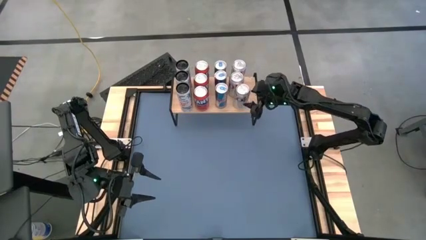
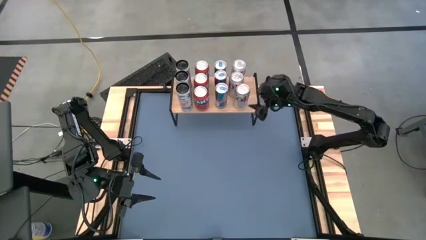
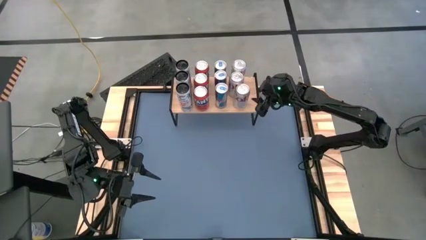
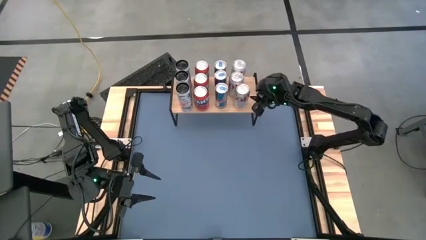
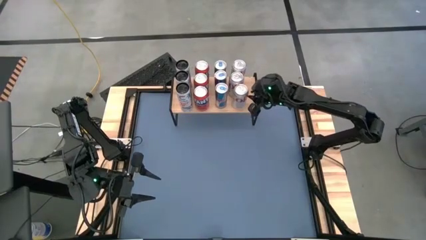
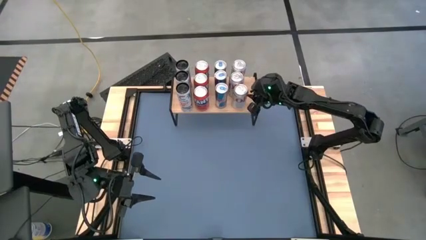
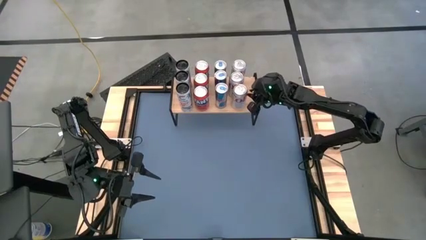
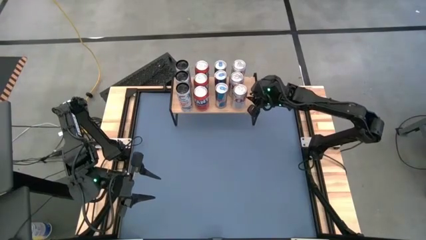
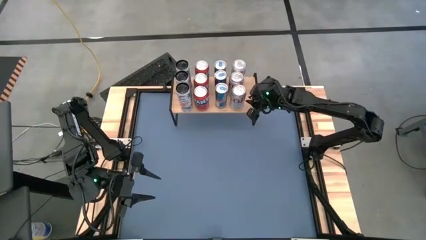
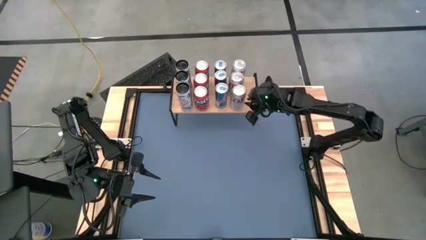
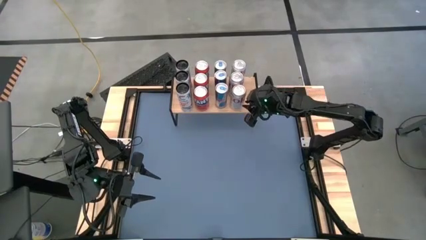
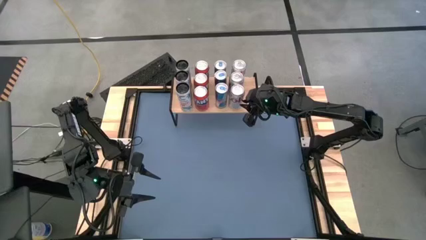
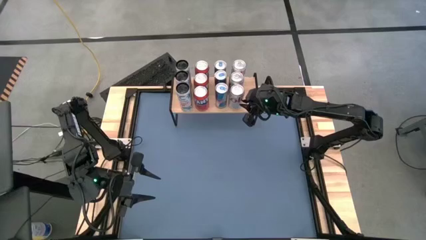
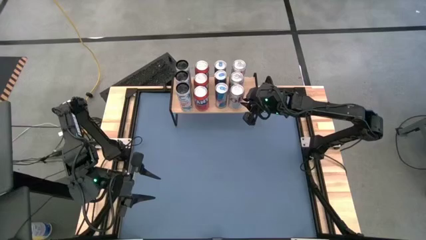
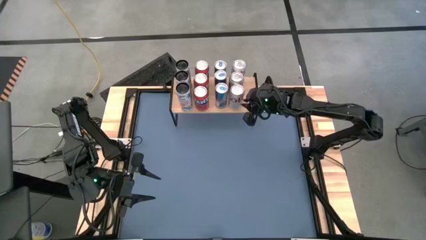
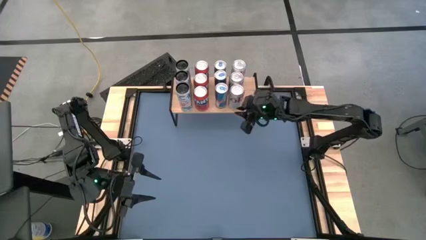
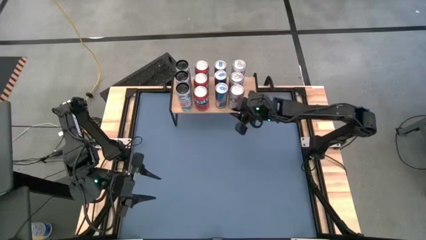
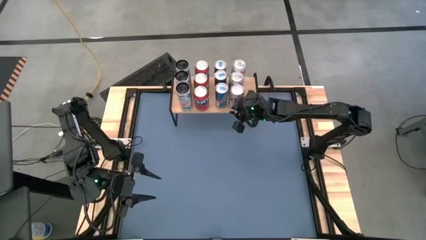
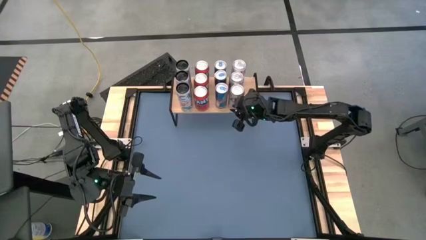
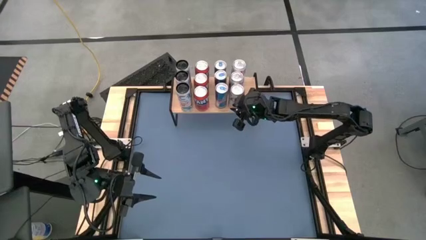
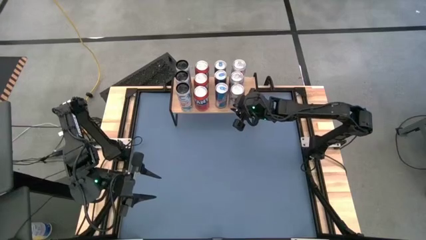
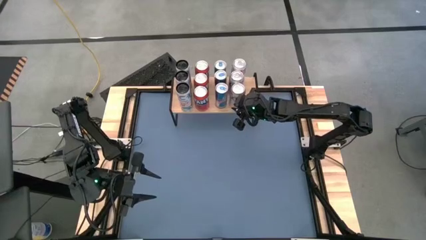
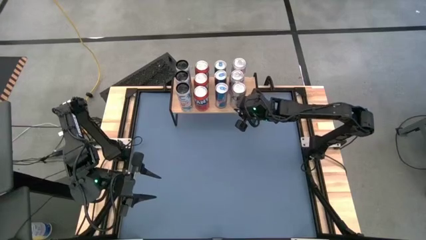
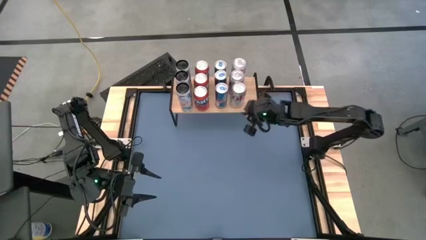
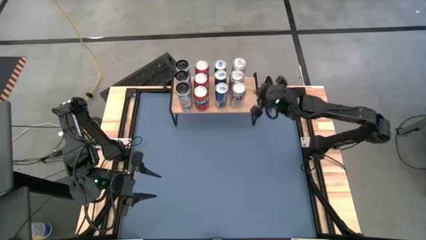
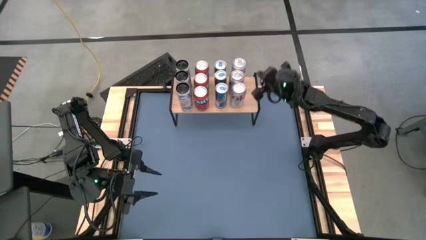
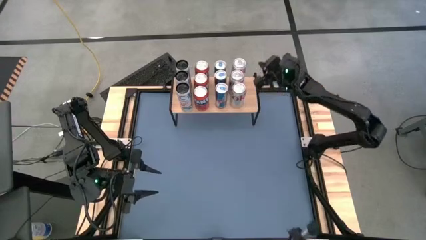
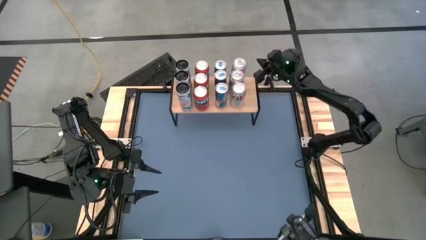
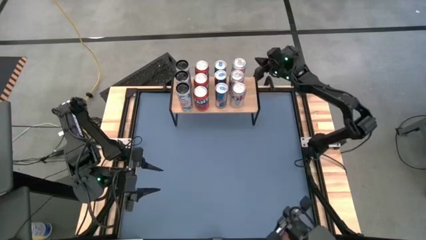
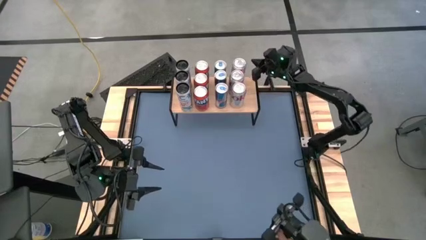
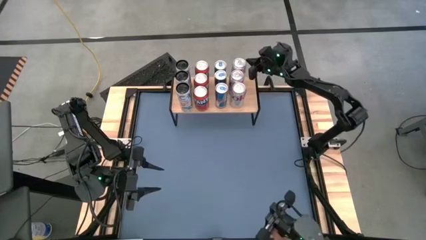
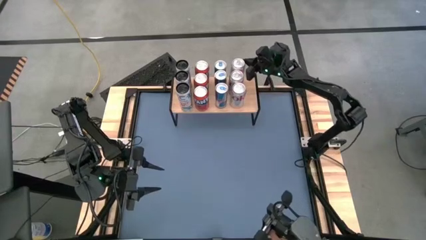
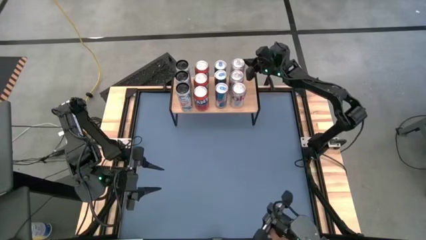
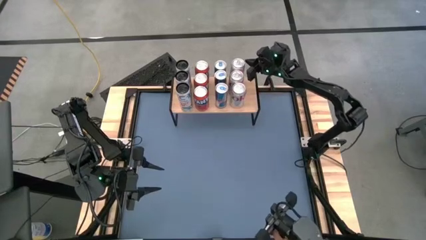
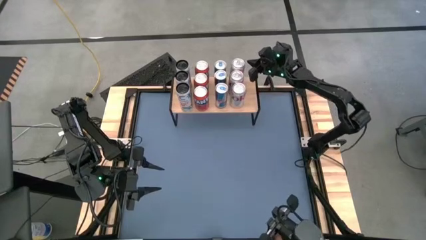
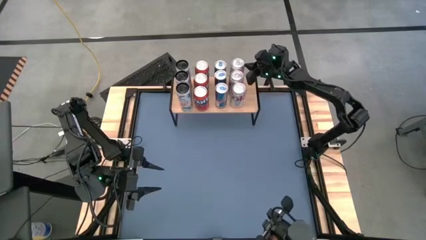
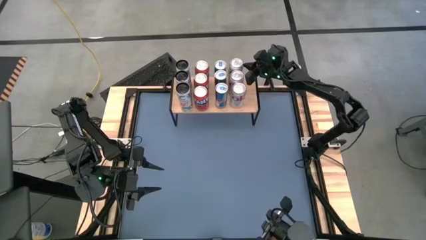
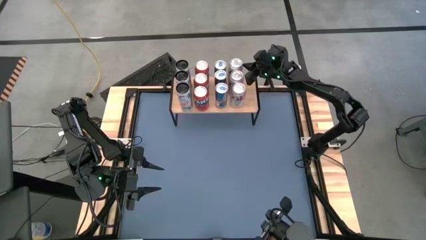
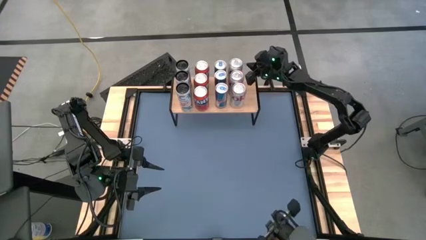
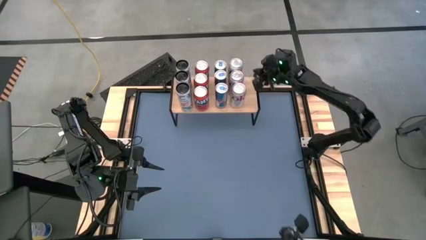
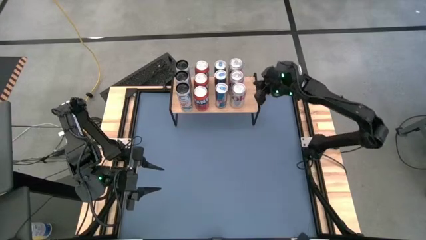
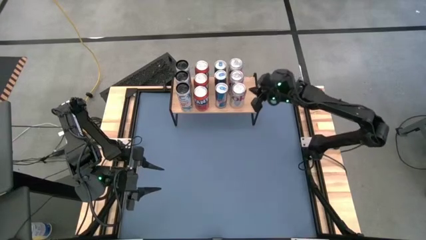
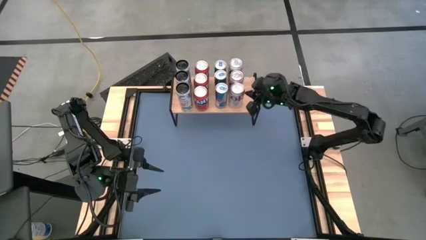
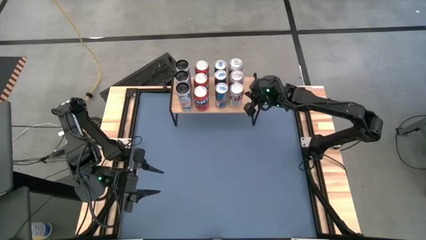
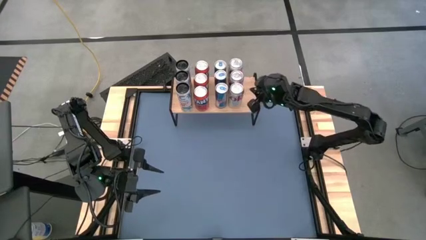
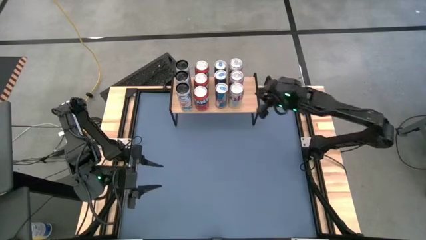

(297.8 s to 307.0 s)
Task: Place canned beverage on shelf
Adjust the white soda can

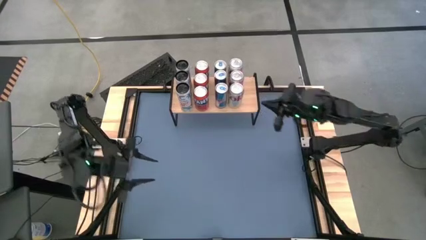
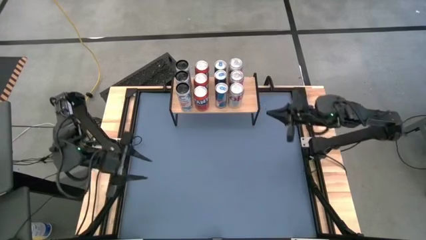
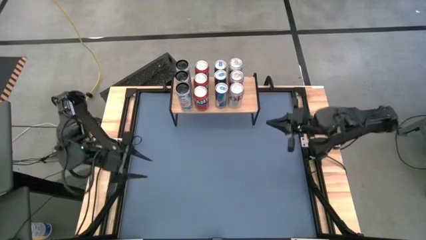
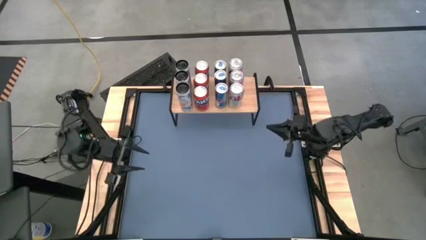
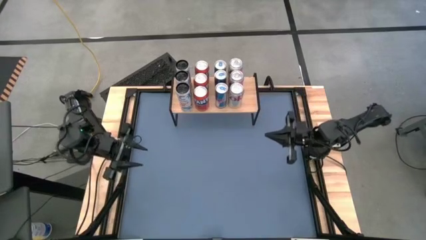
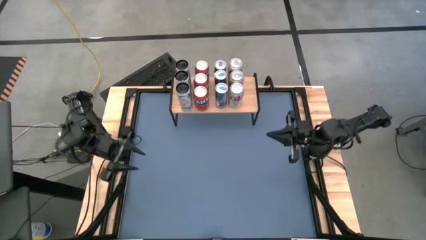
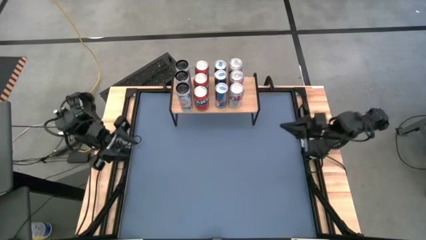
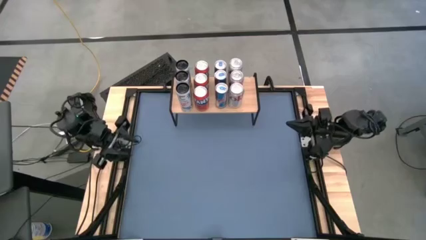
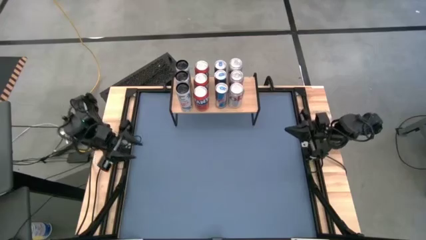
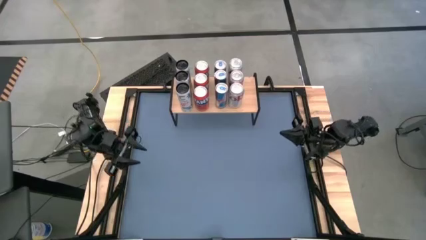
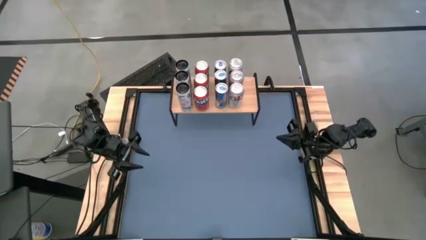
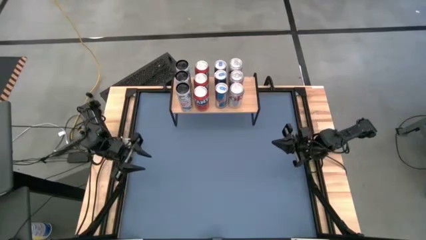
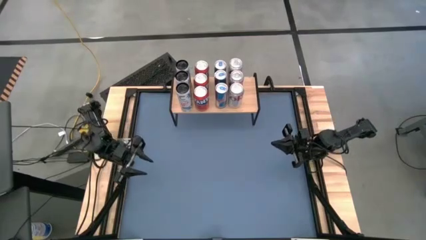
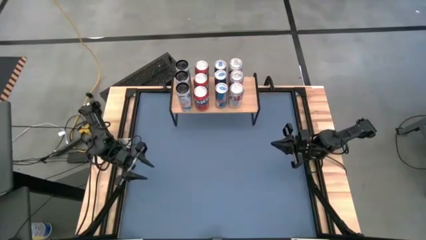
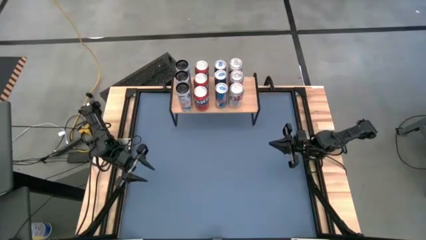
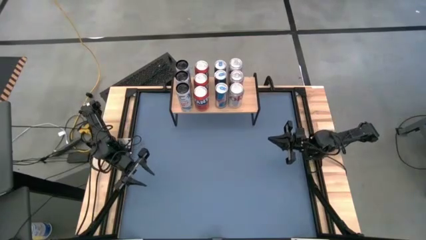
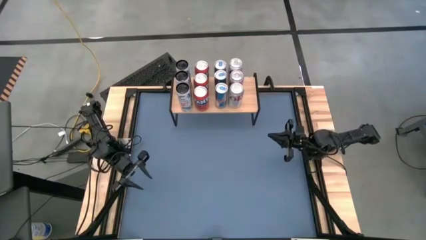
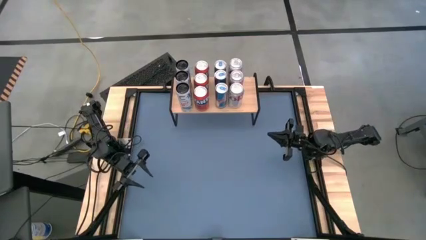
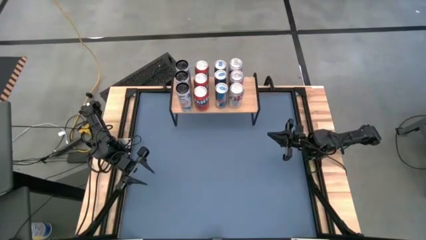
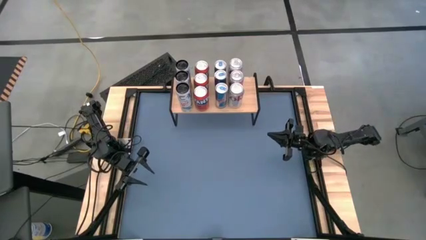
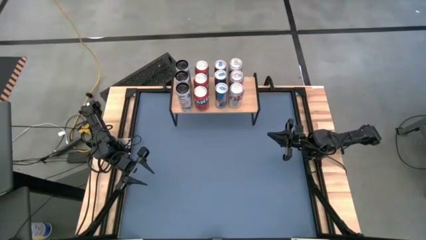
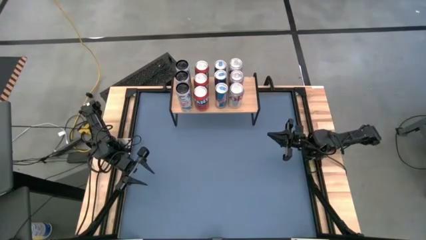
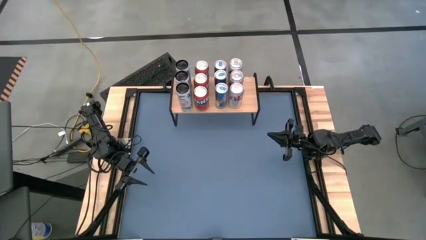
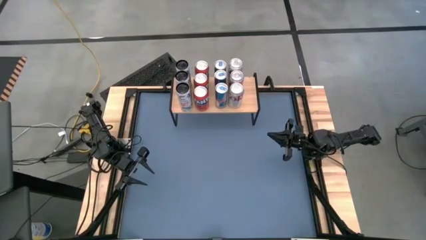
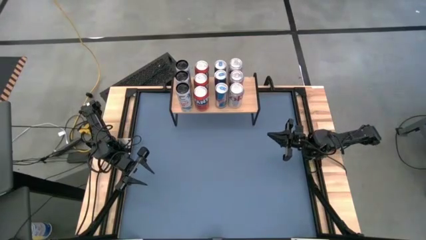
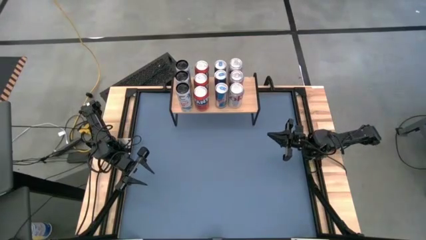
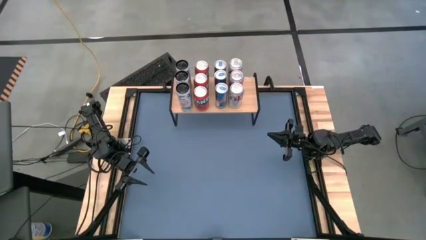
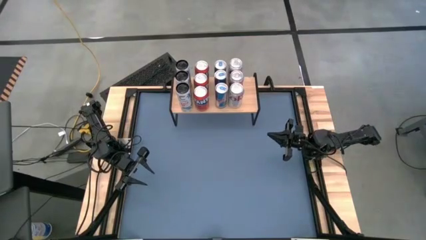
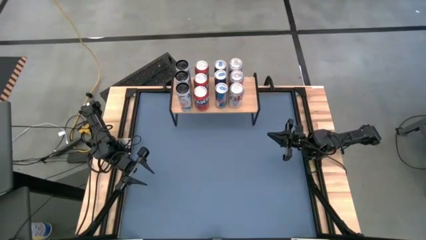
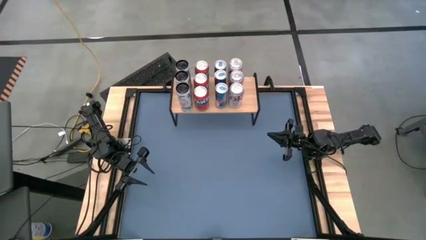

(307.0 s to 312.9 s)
Return to Home Position
